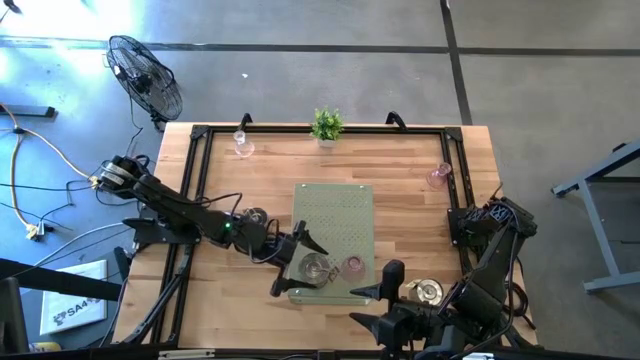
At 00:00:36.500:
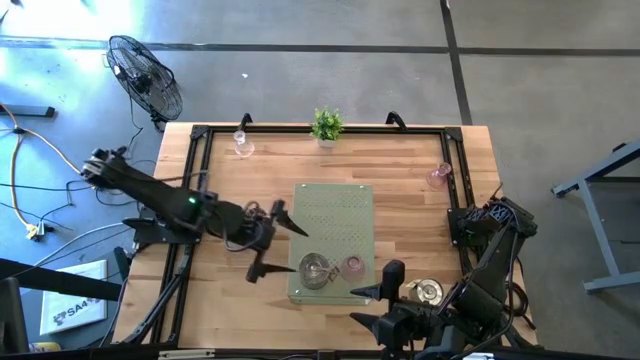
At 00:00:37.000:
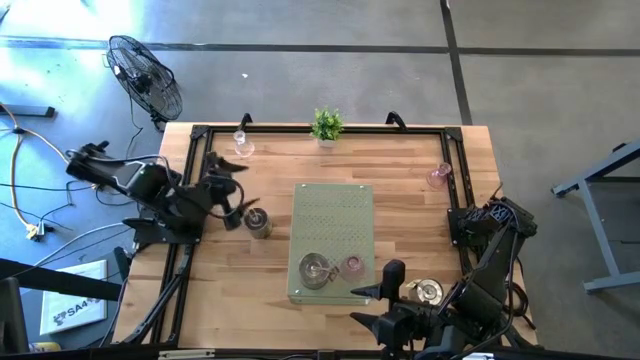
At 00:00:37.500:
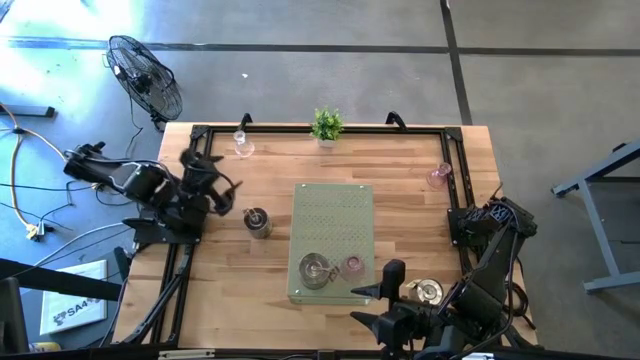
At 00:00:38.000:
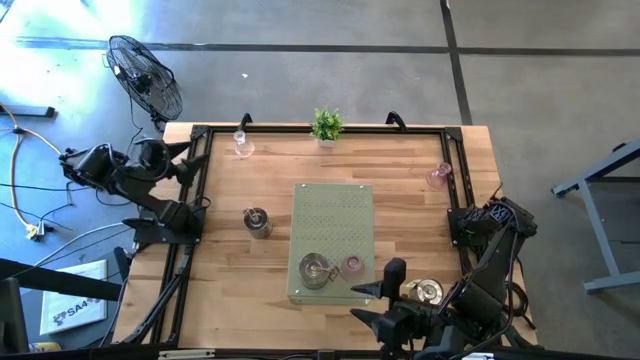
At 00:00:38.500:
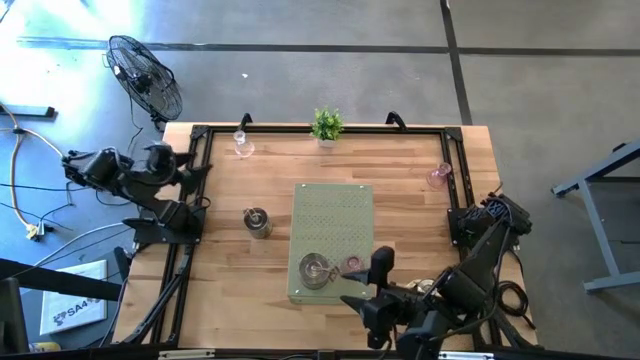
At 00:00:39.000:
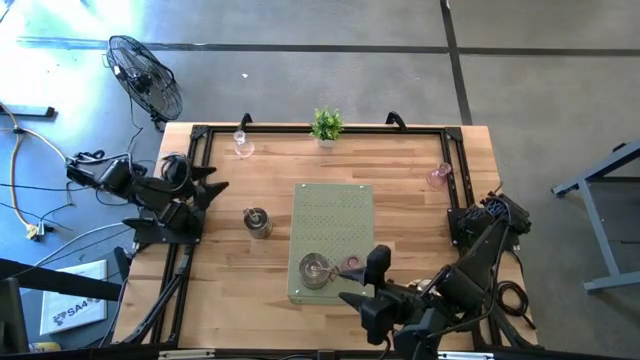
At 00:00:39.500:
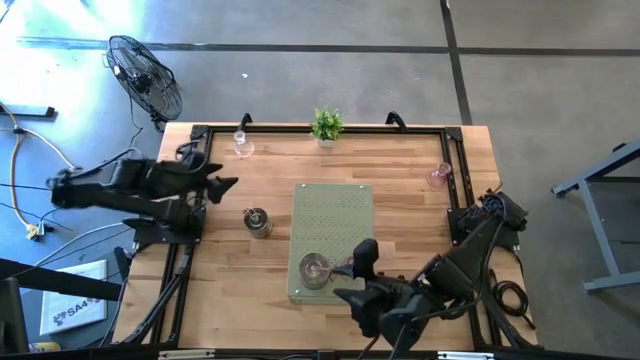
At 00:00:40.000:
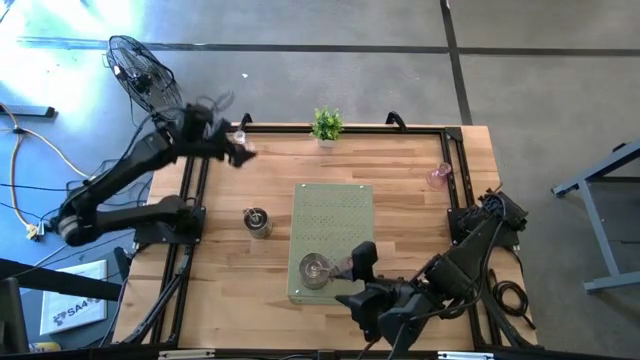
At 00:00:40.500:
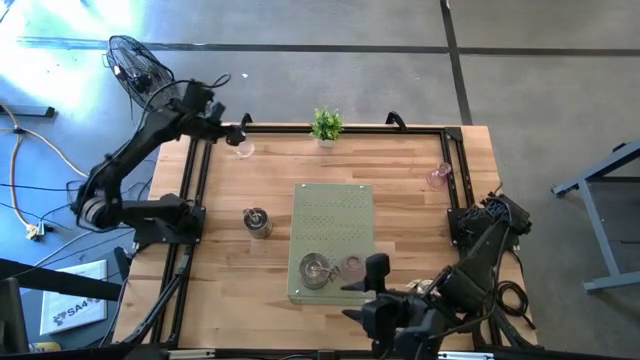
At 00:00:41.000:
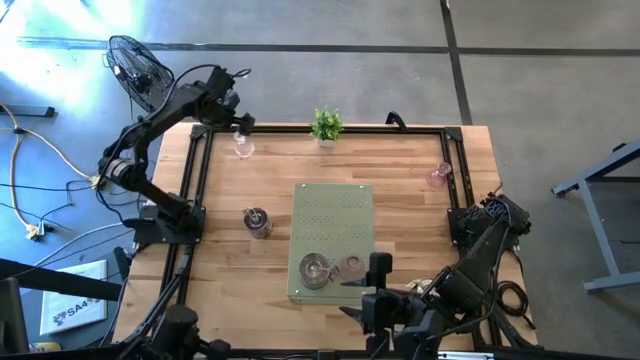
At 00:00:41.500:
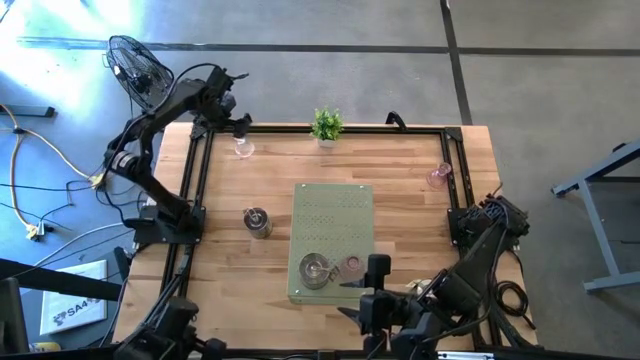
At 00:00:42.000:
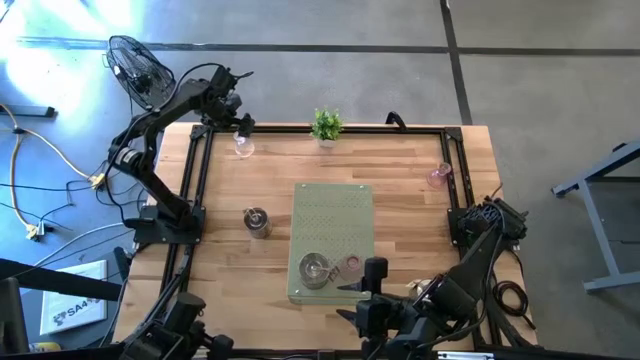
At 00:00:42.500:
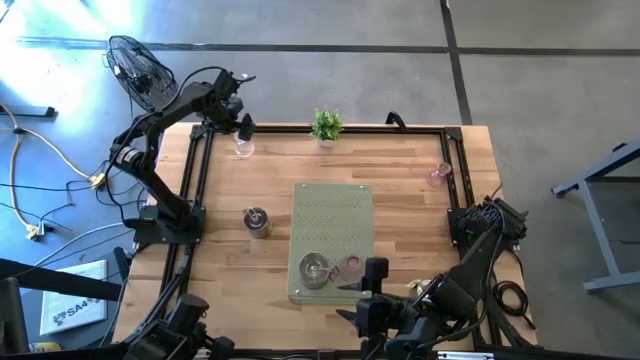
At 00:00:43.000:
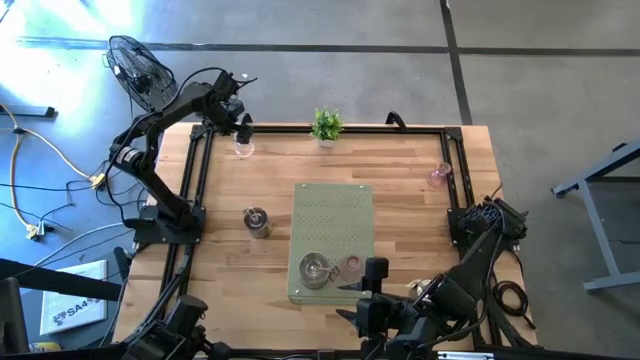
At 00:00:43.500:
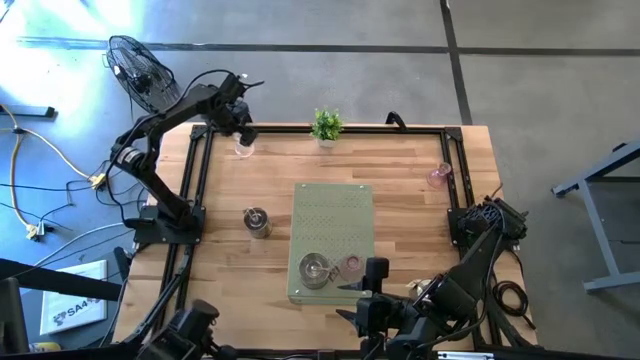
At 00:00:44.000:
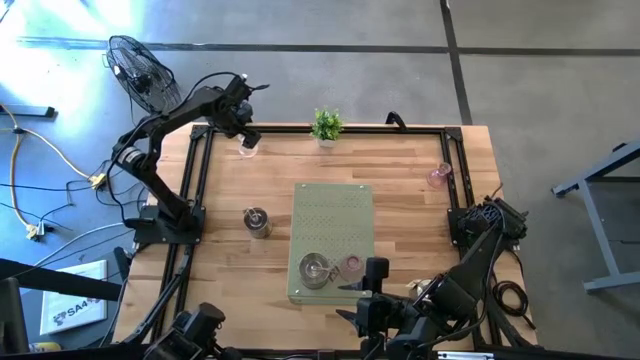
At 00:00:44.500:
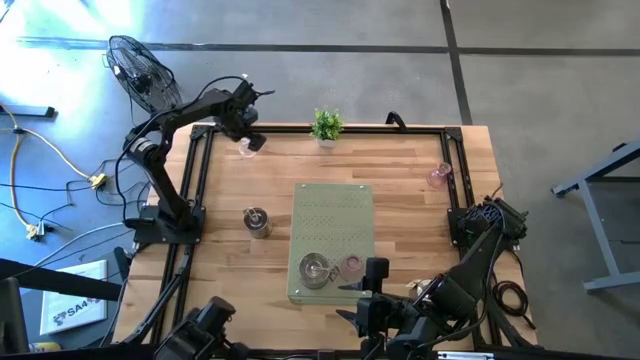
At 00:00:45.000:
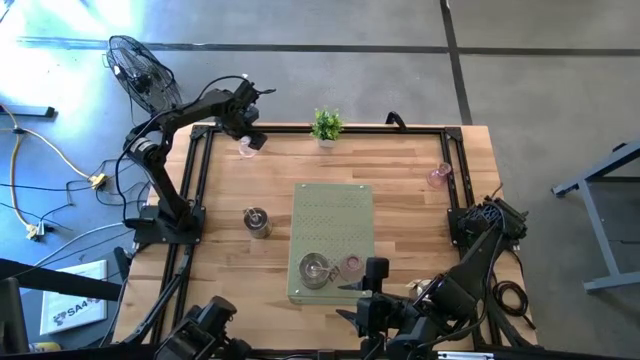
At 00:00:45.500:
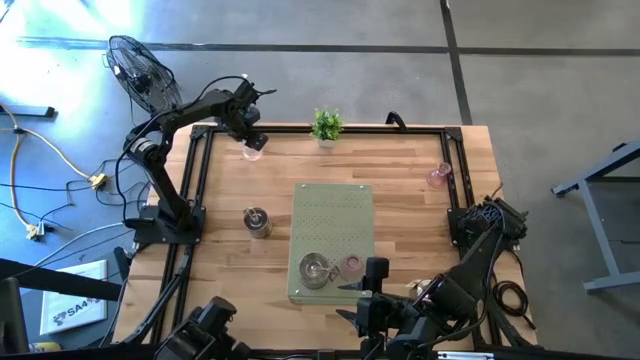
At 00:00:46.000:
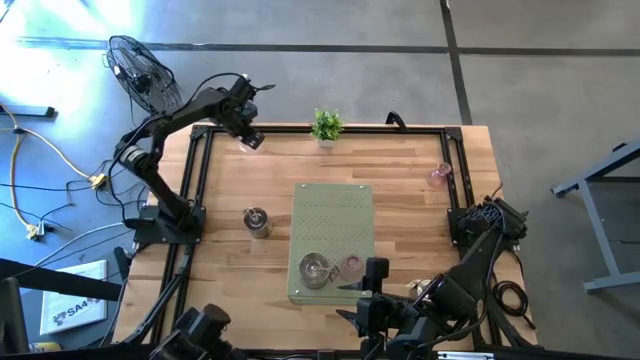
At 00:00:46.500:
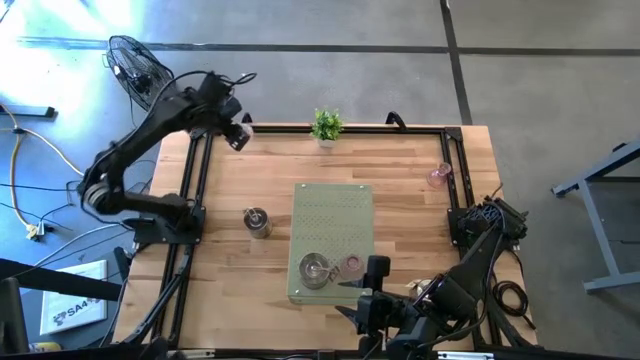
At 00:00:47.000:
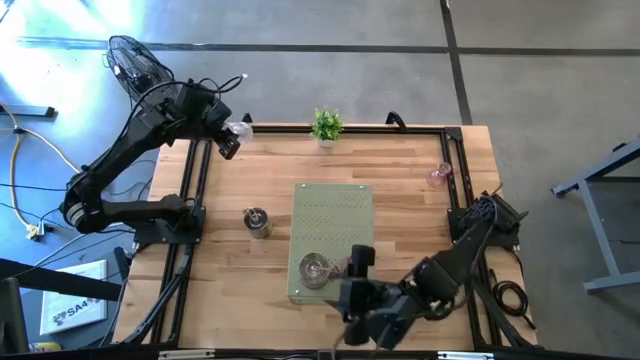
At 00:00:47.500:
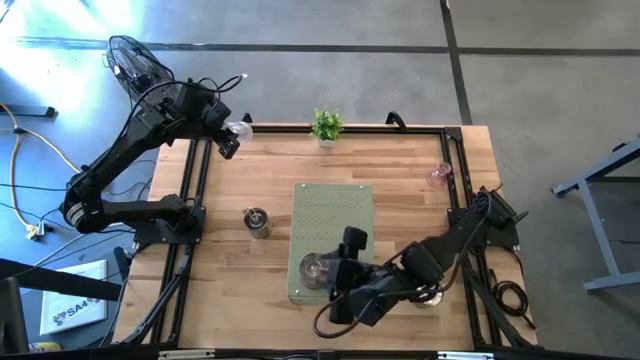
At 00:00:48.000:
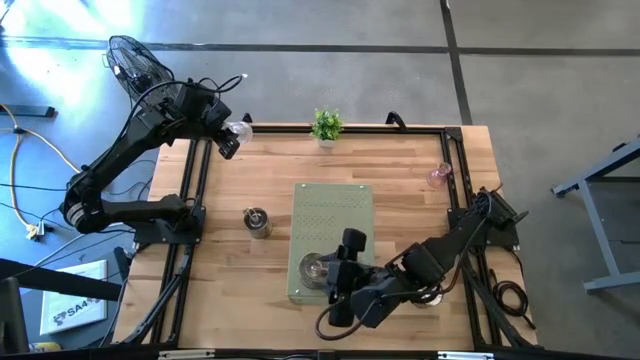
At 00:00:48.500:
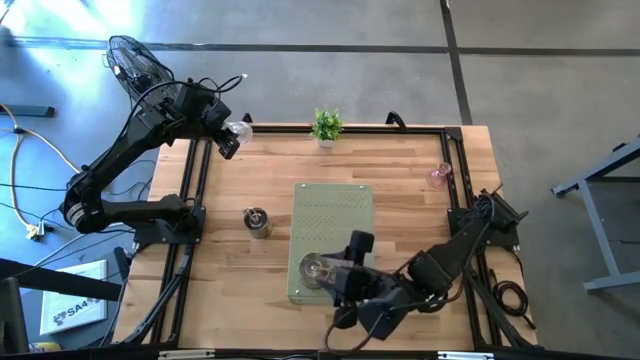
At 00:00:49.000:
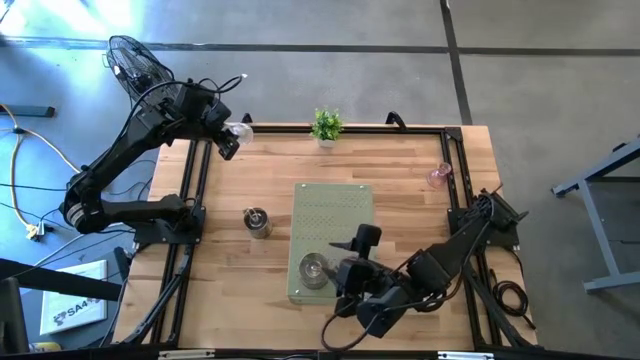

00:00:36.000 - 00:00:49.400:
Task: Pick & Place candle stick holders
Put the transparent candle holder on the shelf
